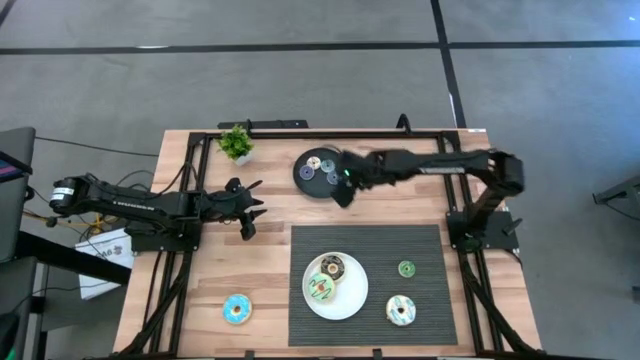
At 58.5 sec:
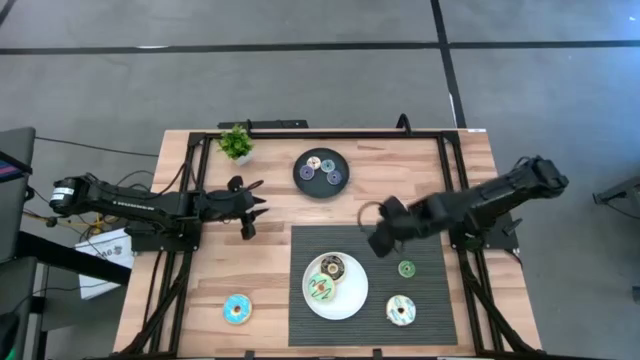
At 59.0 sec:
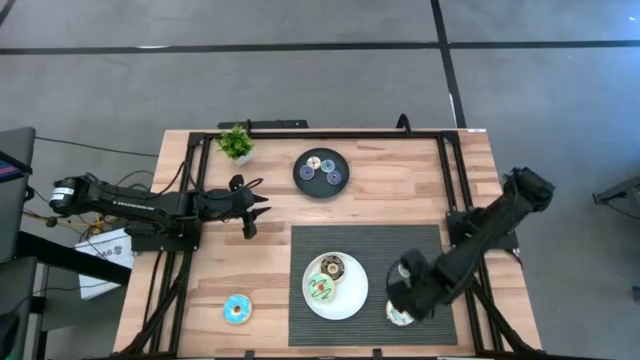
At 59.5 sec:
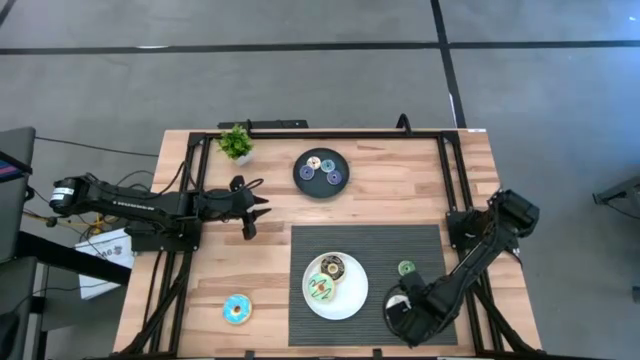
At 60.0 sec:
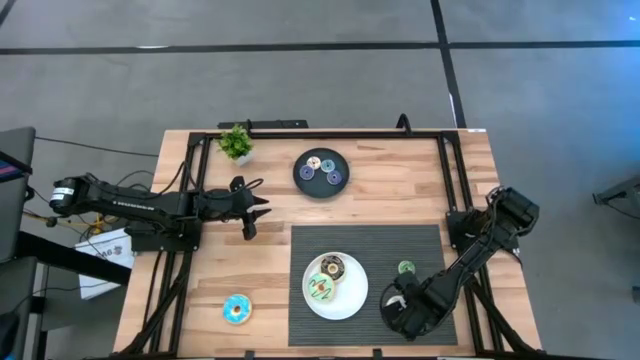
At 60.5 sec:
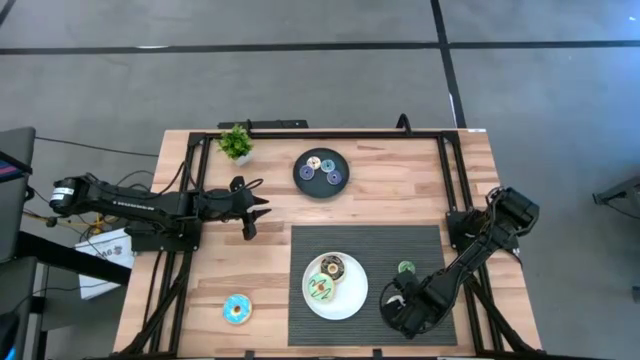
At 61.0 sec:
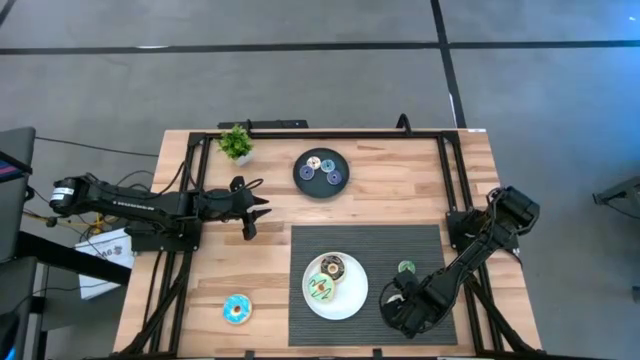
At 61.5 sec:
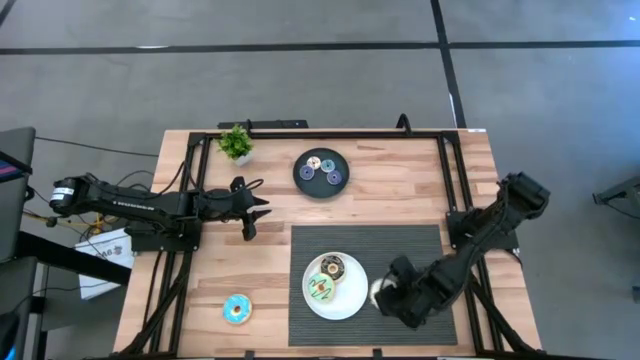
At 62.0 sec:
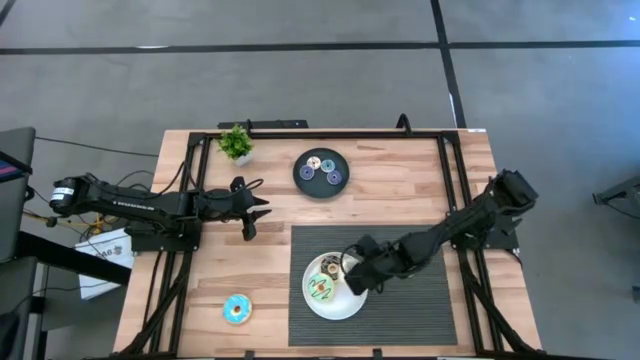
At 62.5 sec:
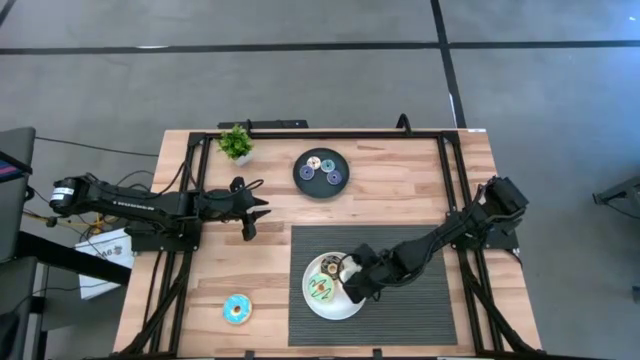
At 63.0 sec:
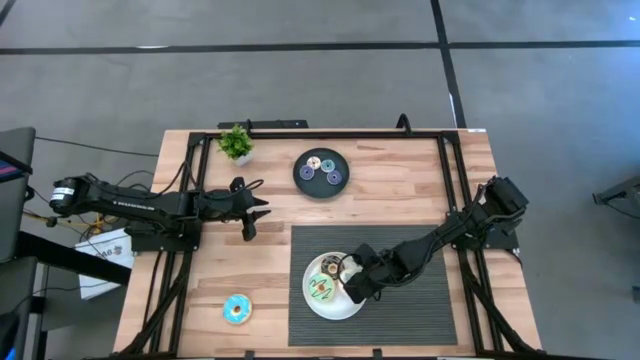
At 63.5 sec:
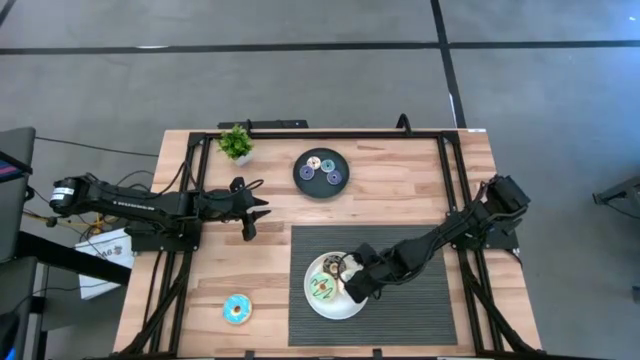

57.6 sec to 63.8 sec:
Task: Pick & Place donuts
Put the large white donut on the white plate

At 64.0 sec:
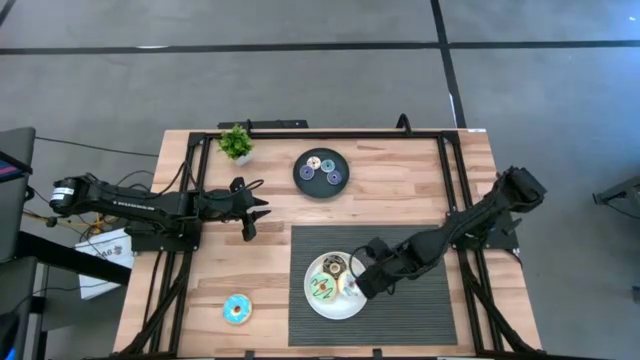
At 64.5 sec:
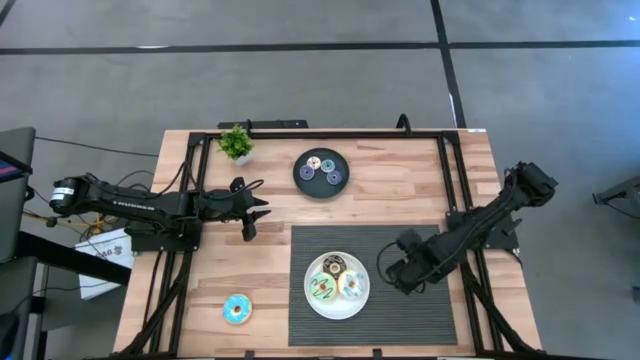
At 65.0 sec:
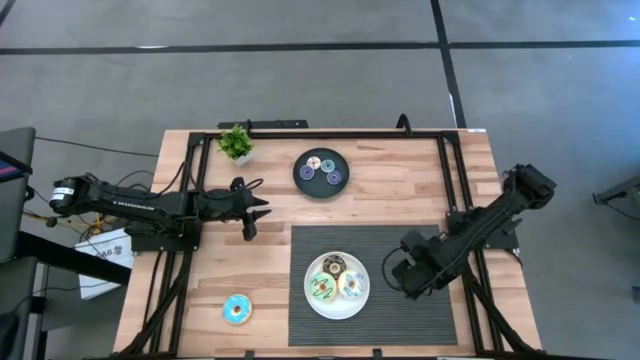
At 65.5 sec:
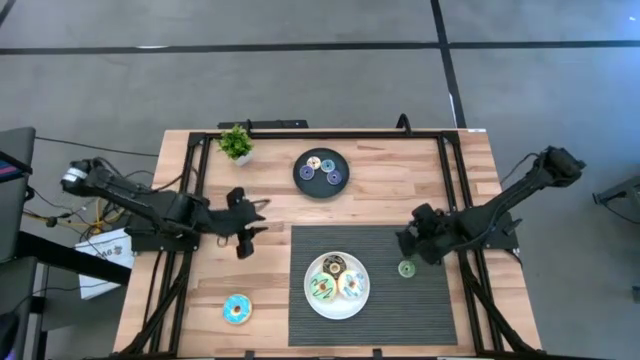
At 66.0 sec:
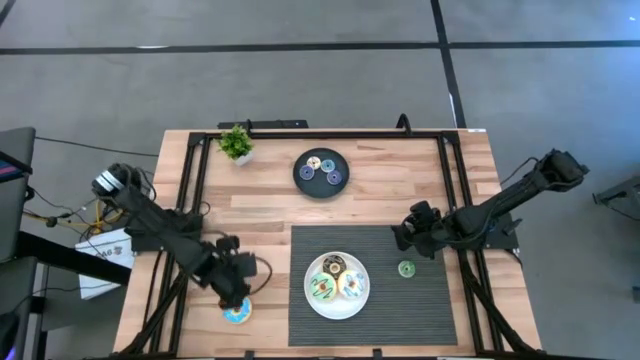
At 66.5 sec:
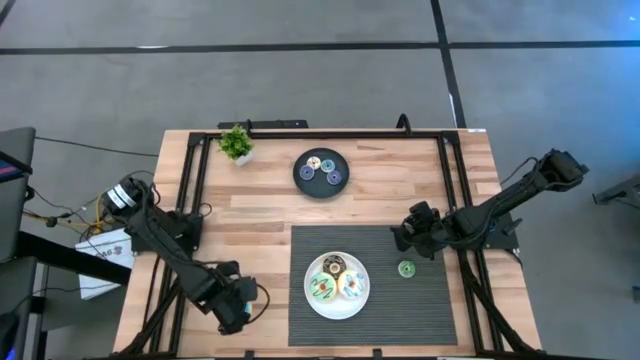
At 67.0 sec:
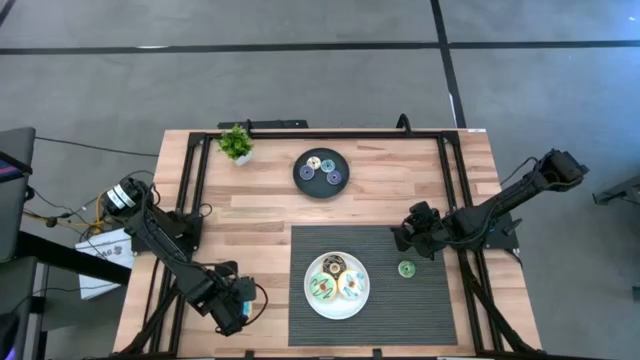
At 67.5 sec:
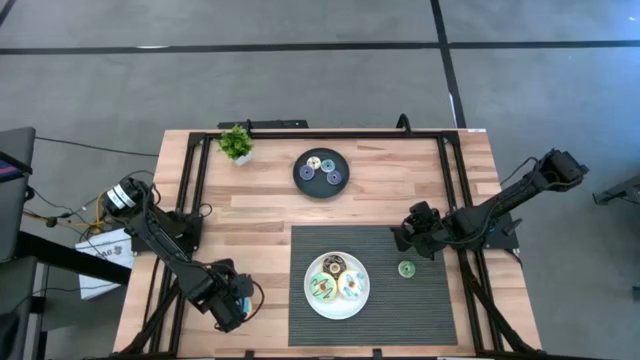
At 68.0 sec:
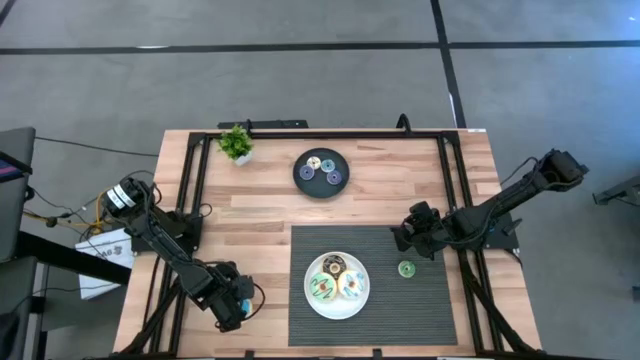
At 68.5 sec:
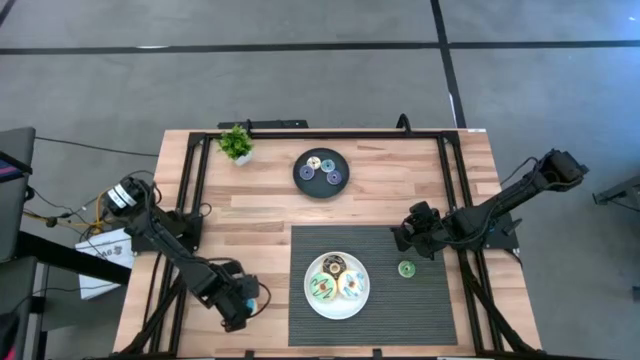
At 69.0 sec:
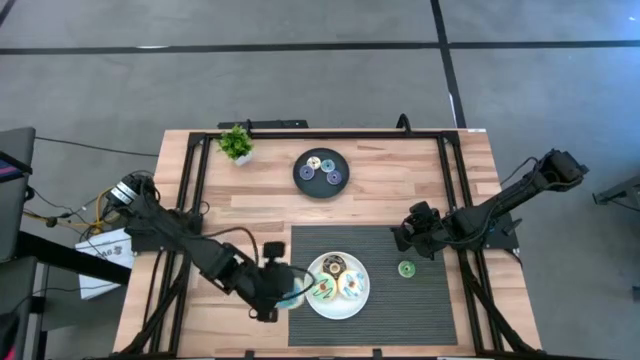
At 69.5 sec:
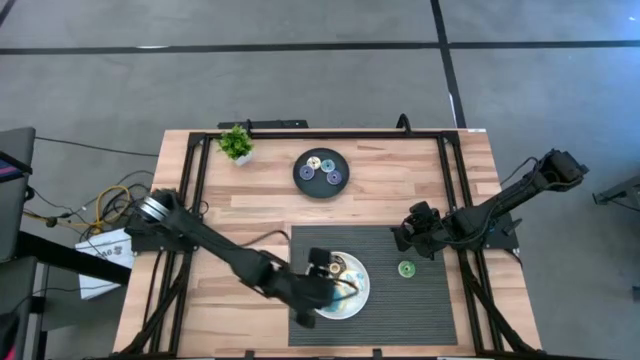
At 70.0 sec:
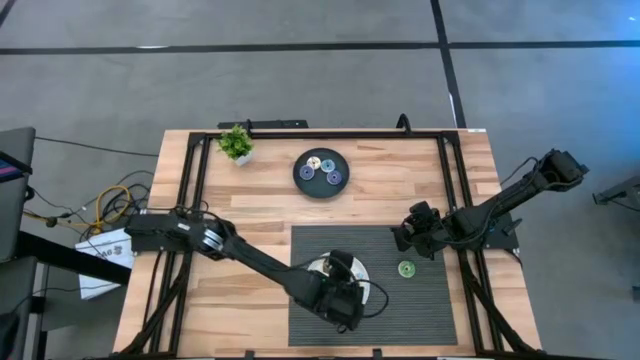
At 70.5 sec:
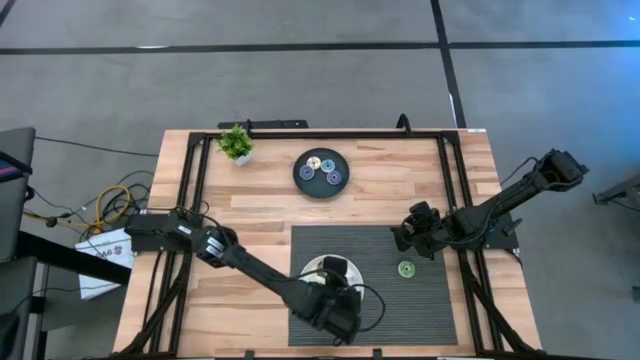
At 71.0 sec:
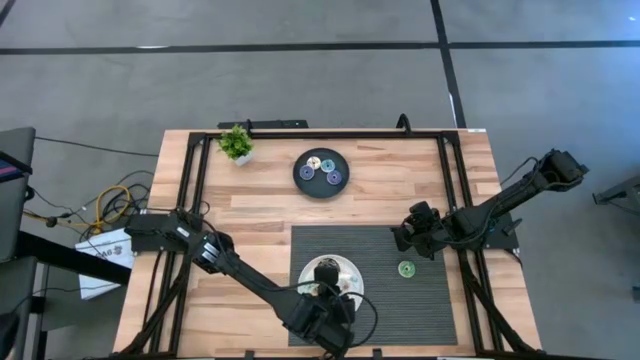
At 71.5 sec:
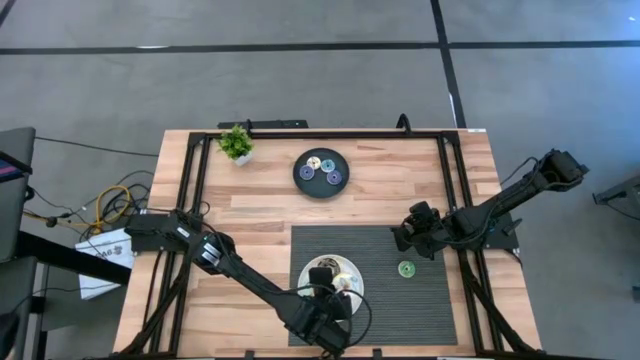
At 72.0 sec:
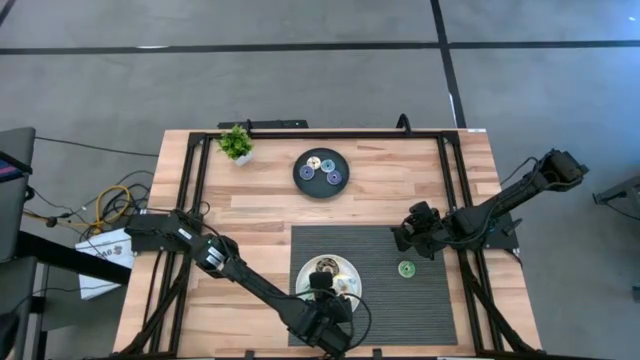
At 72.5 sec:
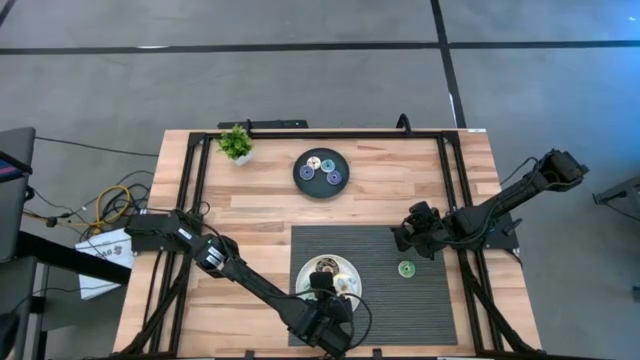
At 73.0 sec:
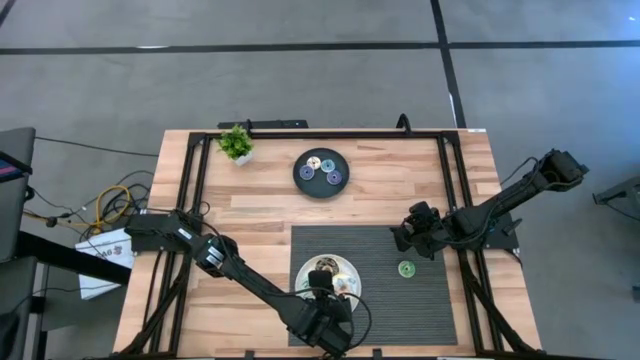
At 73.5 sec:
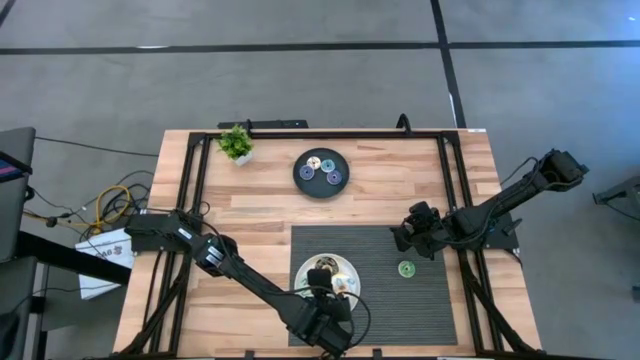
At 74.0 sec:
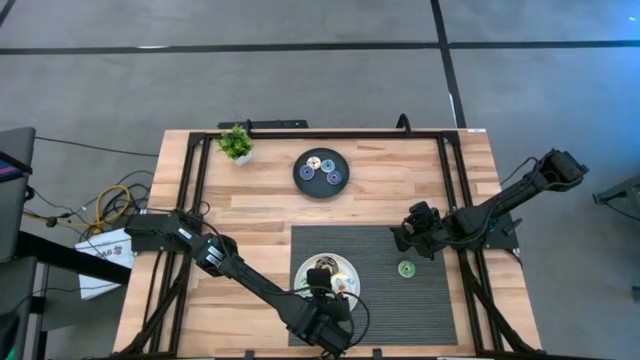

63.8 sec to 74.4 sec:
Put the large blue donut on the white plate

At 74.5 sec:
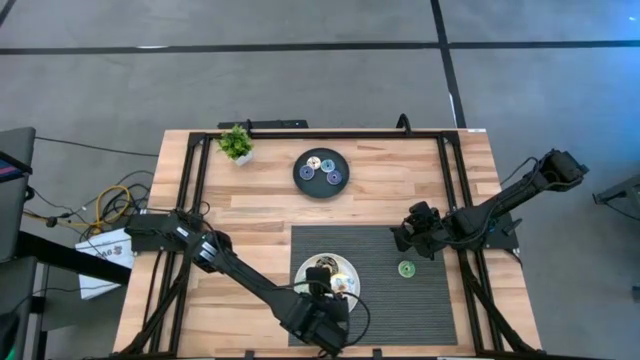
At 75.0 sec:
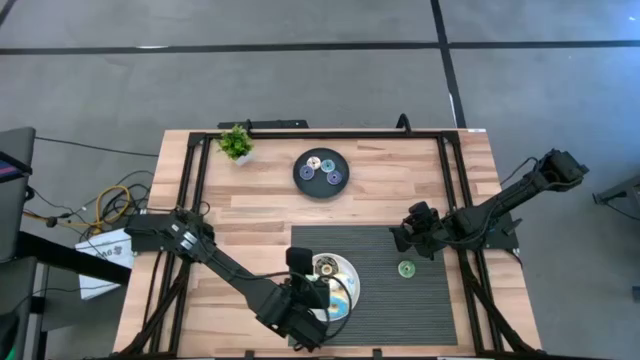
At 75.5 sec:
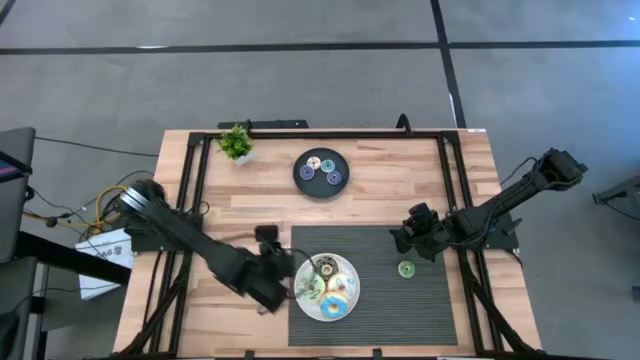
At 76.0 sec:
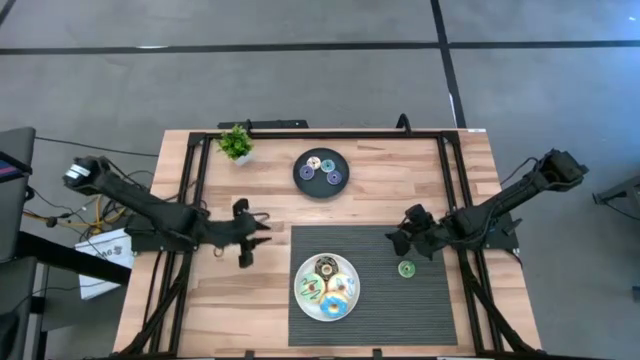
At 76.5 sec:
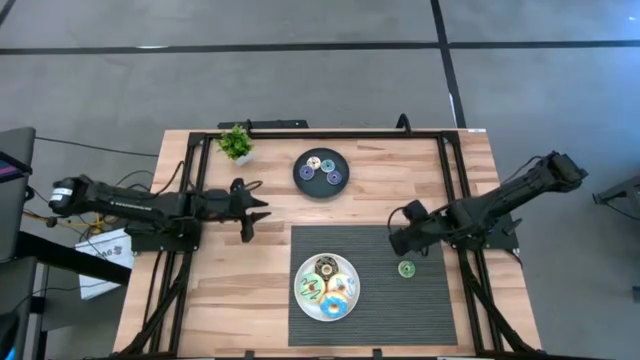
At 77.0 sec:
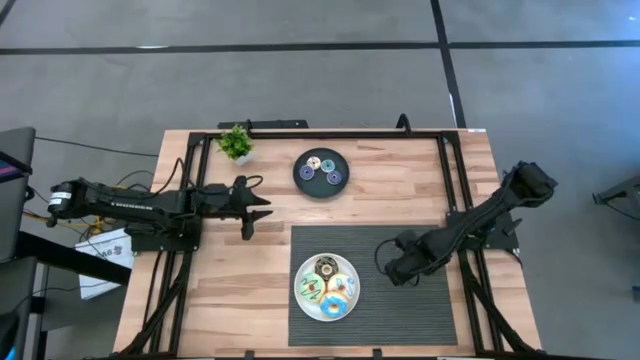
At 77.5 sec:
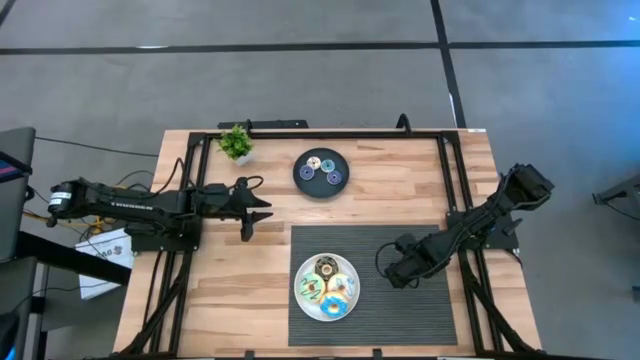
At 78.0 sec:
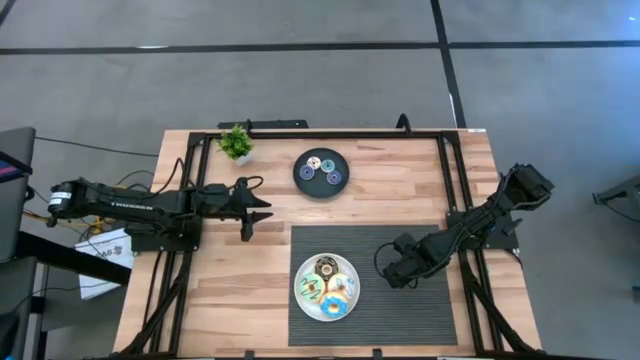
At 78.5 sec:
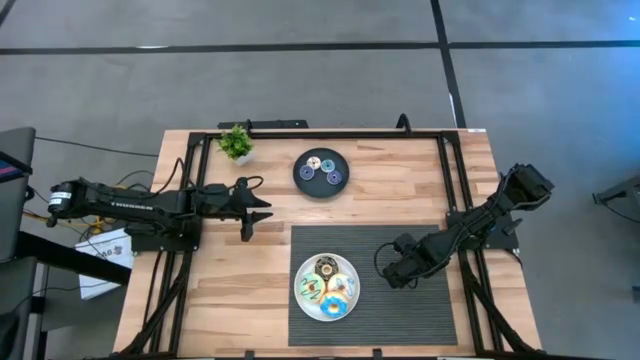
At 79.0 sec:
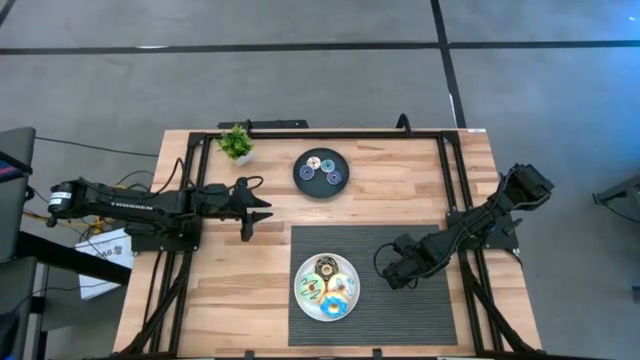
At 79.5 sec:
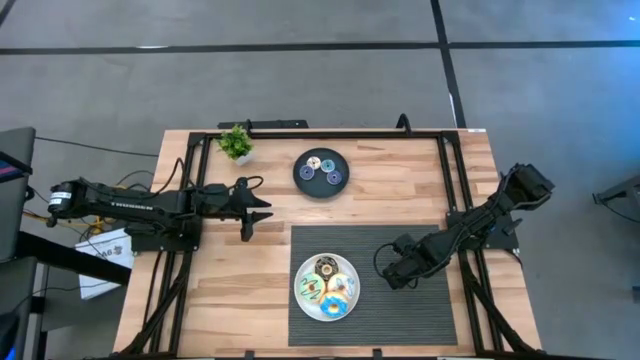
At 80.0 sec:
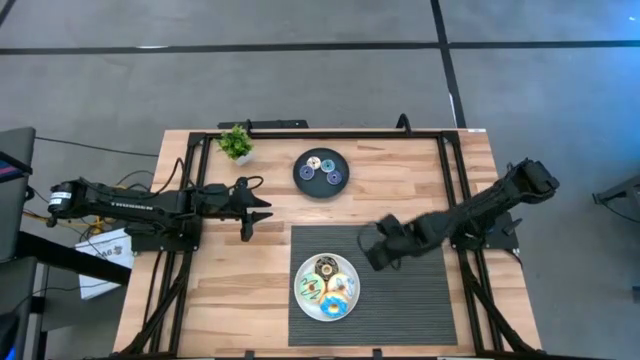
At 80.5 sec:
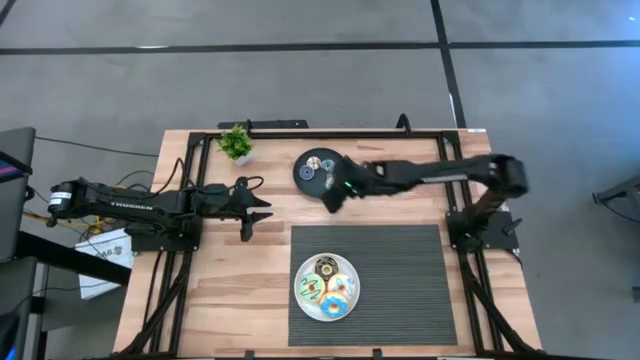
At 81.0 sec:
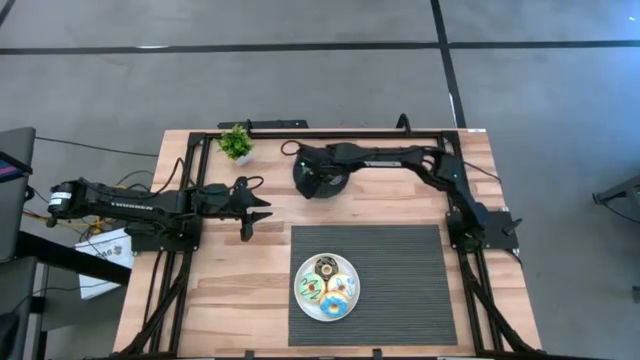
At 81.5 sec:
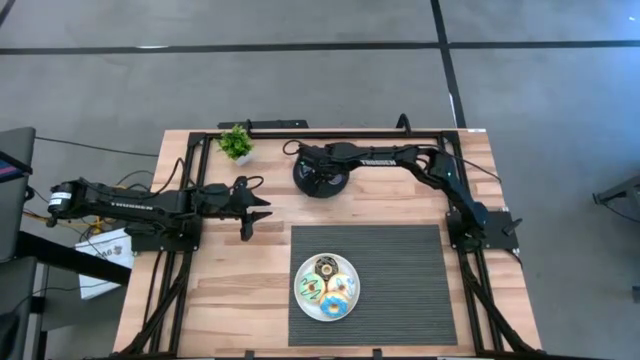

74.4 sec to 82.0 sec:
Put the small green donut on the black plate
